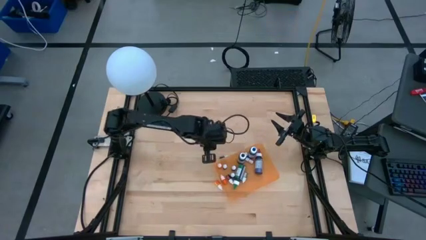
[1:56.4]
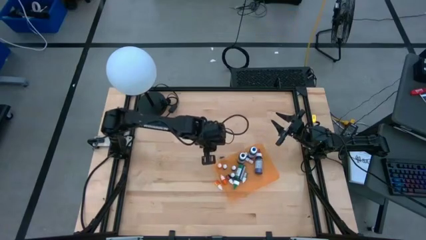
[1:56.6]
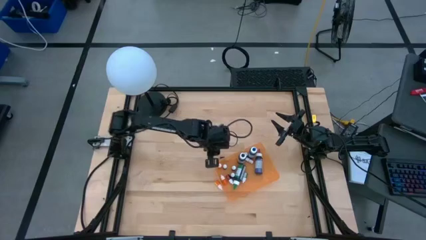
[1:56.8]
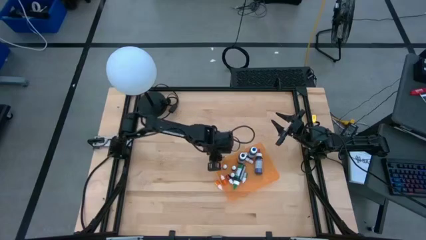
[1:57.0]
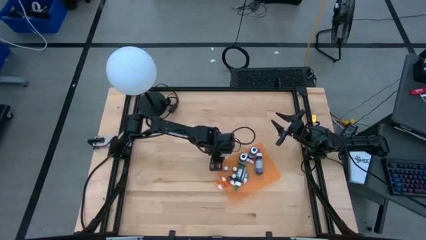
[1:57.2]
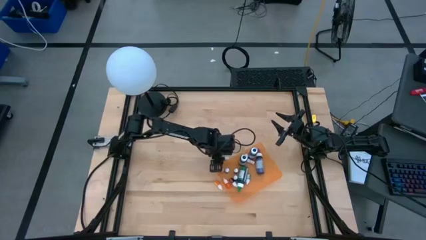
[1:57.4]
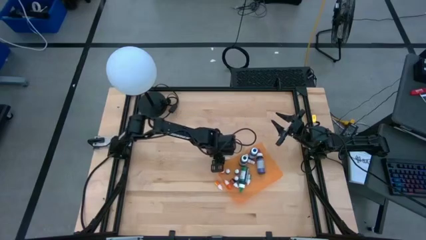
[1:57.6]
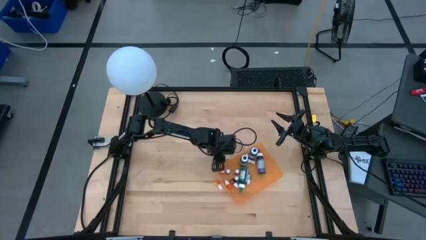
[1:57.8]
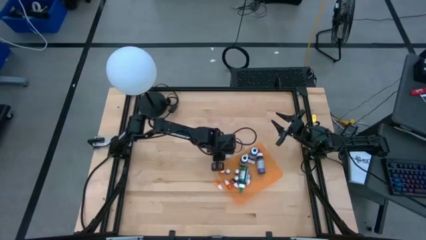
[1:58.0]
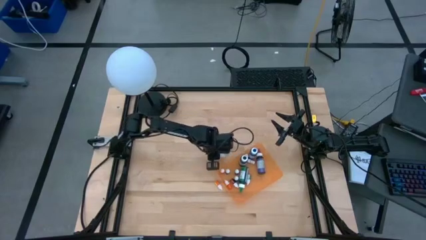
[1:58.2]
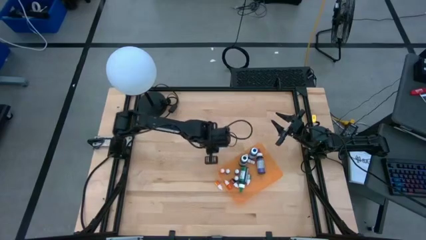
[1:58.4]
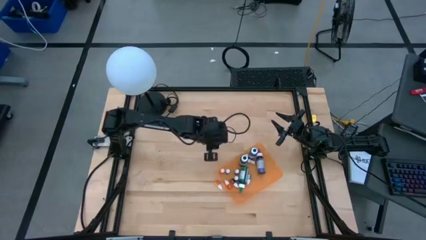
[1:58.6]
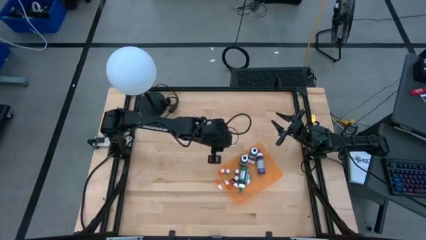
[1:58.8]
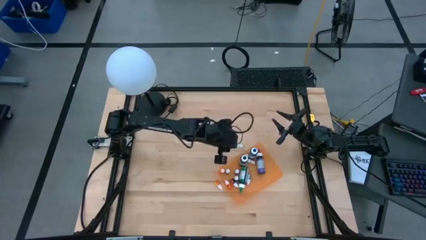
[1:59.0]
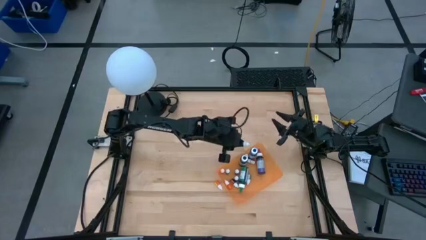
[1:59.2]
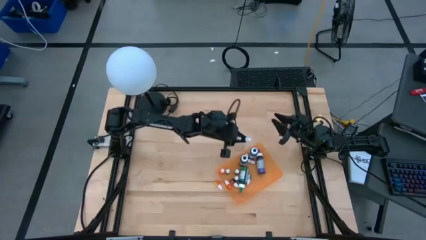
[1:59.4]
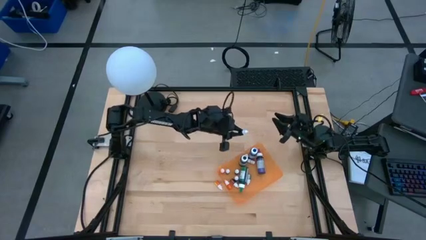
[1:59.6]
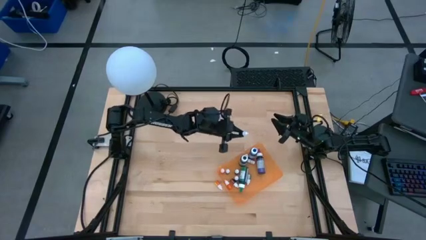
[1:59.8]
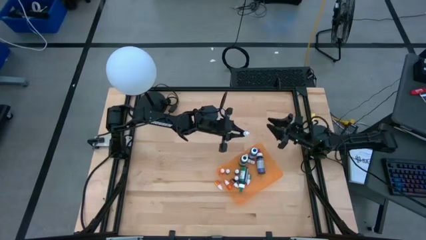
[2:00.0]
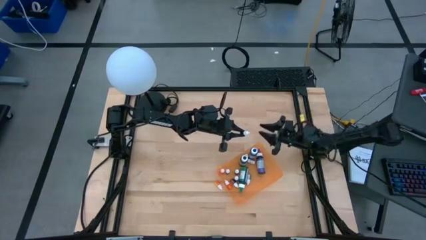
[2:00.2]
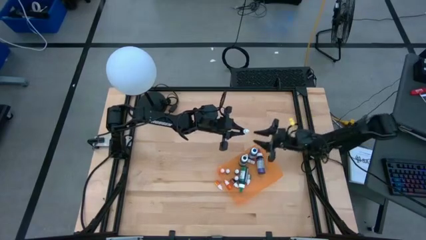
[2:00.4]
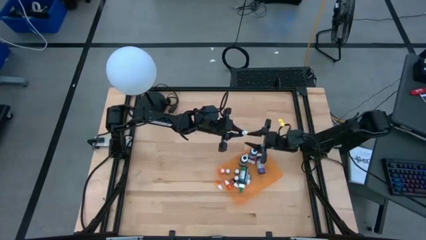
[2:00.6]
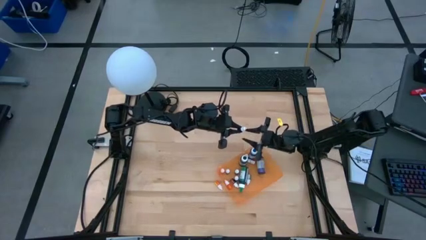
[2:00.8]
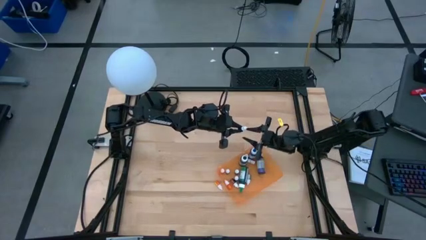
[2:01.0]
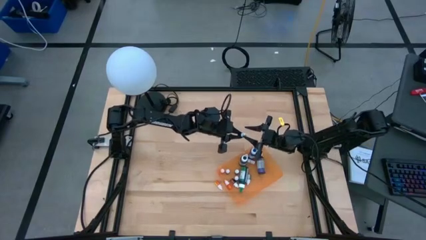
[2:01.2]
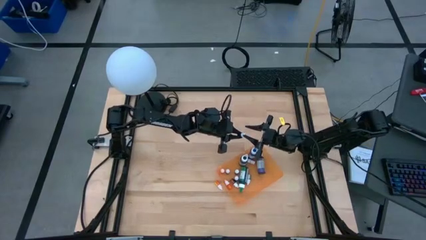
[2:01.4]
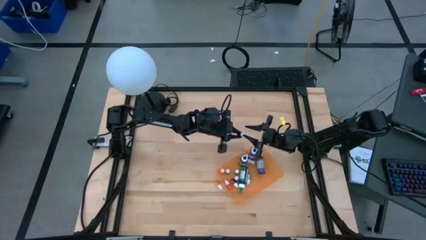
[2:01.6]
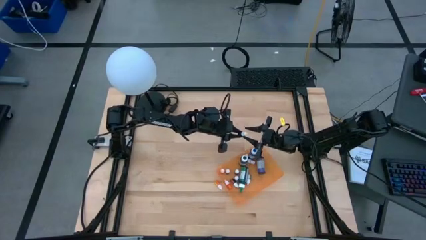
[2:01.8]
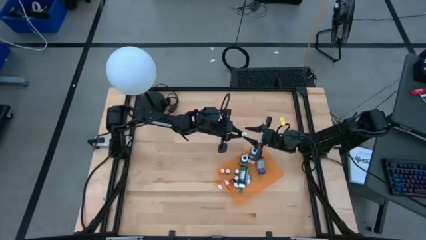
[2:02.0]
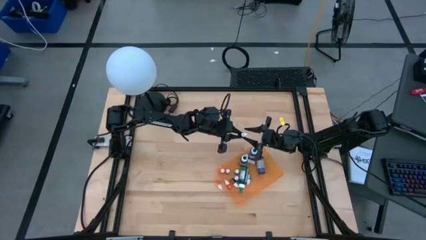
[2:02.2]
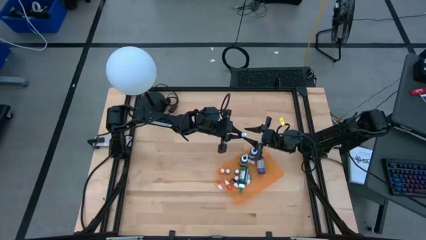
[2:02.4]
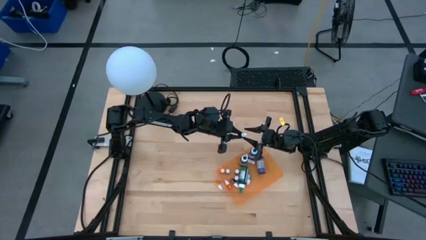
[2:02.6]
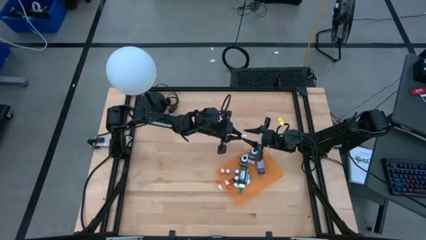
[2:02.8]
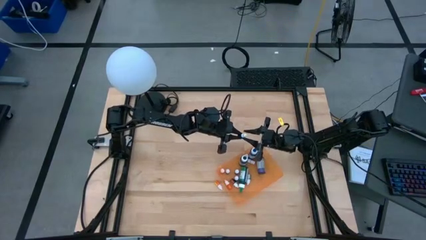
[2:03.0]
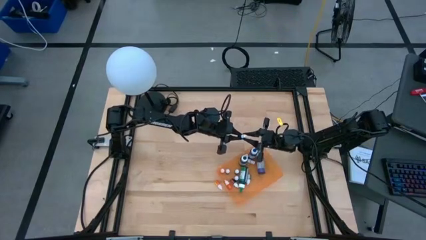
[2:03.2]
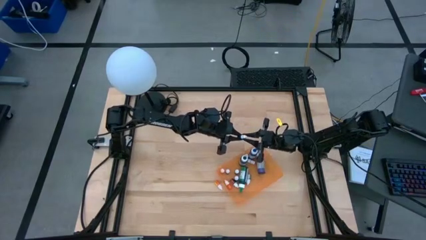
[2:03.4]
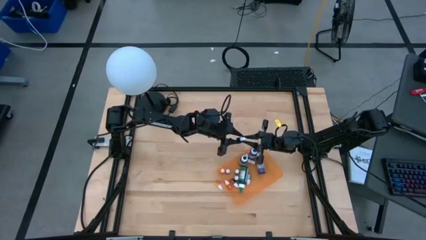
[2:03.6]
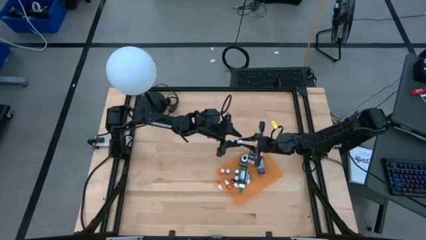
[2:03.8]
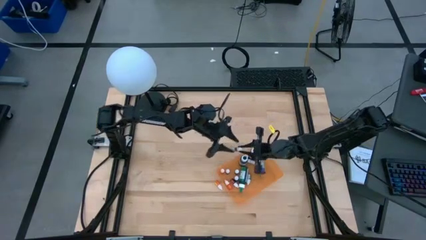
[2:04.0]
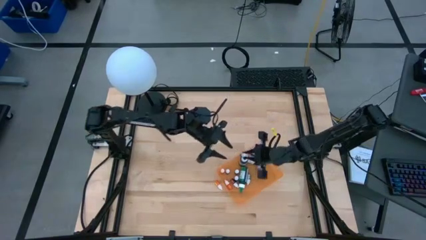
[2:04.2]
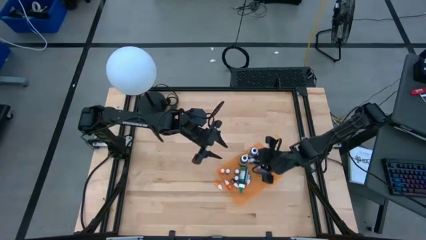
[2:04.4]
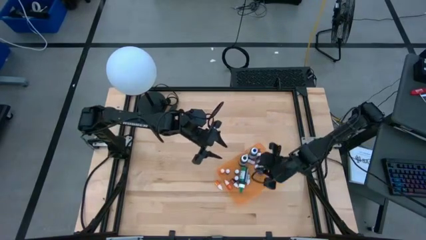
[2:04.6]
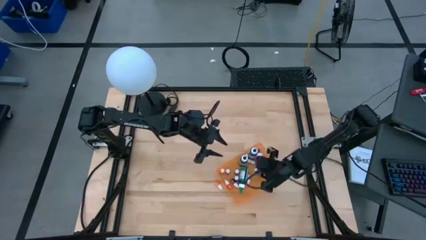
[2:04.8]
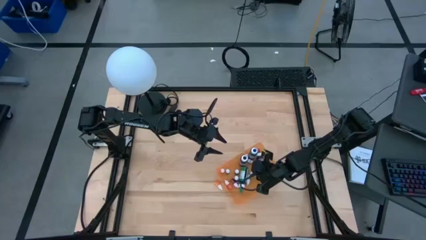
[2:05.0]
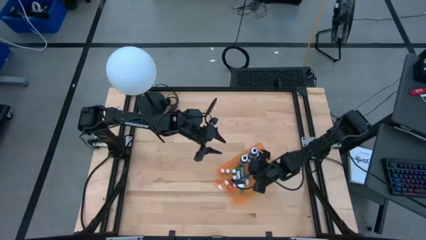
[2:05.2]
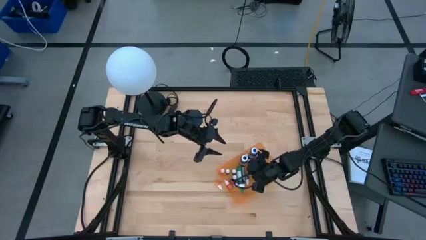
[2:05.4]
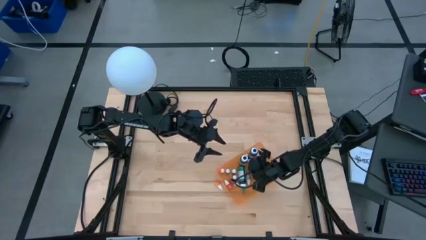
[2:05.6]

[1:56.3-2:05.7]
Task: Pick & Place food coloring
Put the small blue food coloring bottle into the orange bin

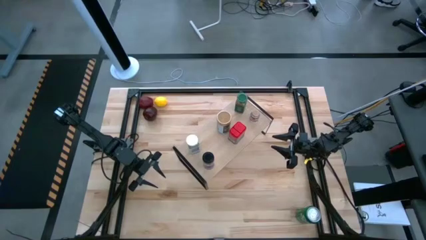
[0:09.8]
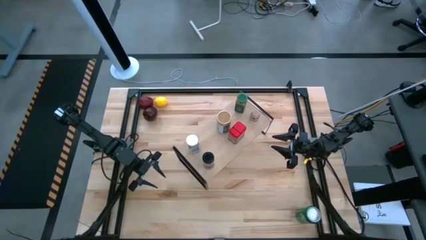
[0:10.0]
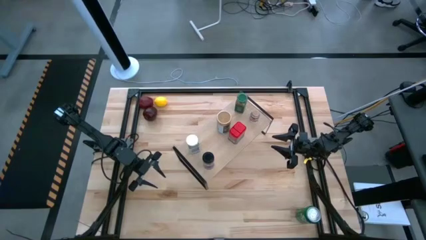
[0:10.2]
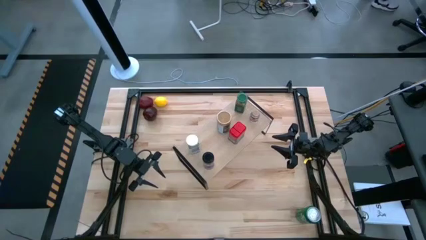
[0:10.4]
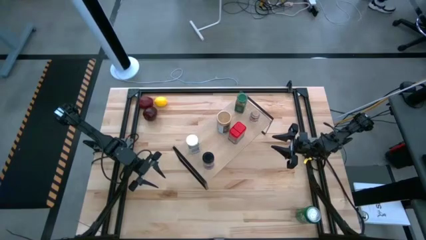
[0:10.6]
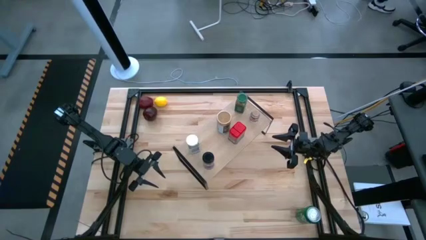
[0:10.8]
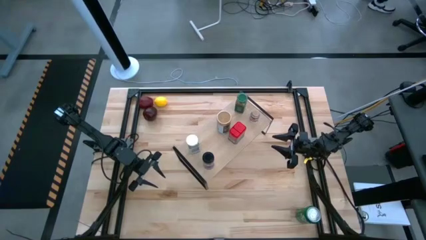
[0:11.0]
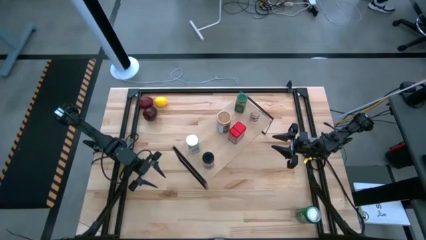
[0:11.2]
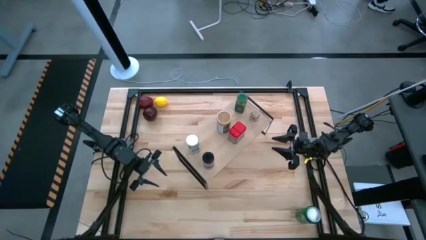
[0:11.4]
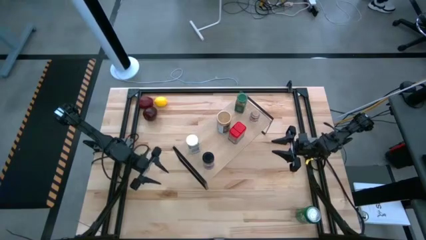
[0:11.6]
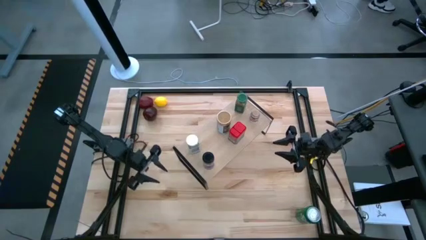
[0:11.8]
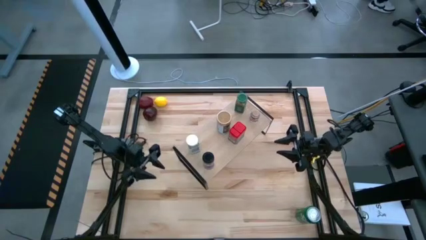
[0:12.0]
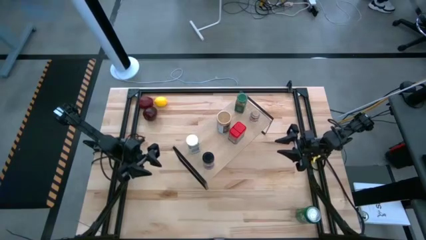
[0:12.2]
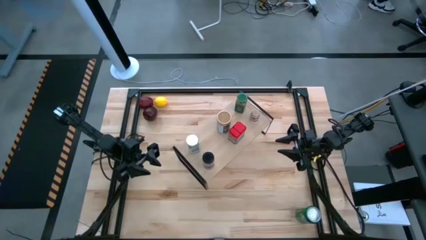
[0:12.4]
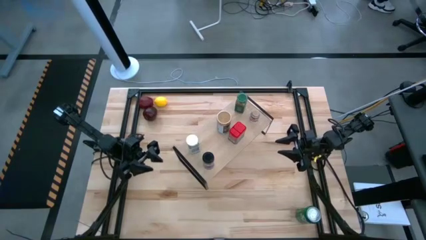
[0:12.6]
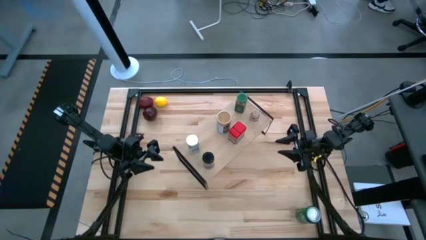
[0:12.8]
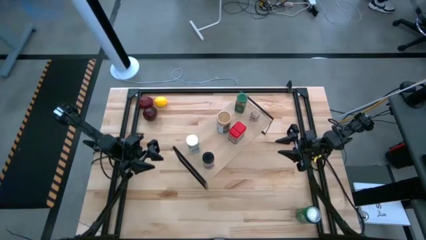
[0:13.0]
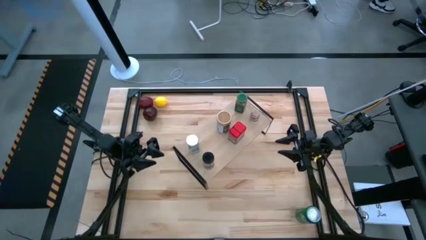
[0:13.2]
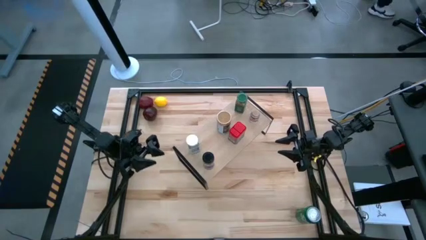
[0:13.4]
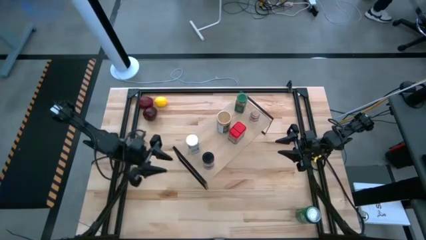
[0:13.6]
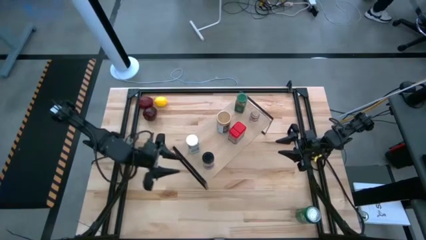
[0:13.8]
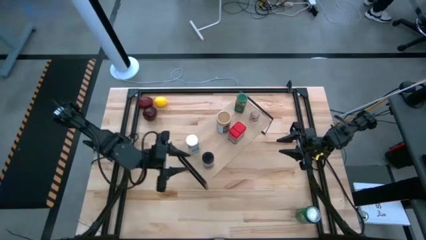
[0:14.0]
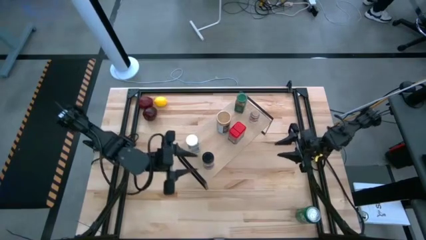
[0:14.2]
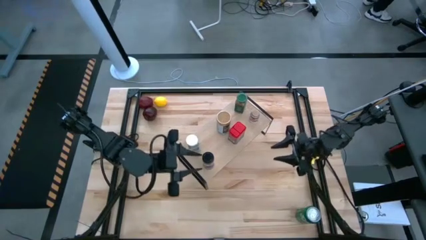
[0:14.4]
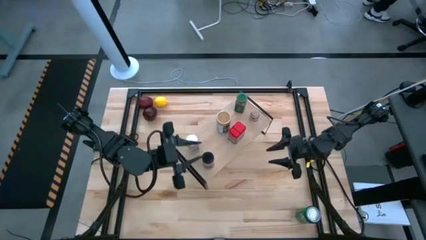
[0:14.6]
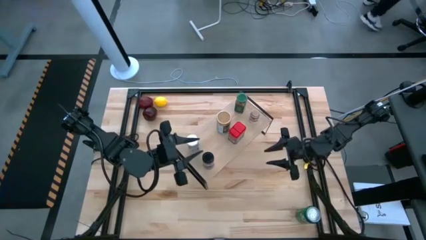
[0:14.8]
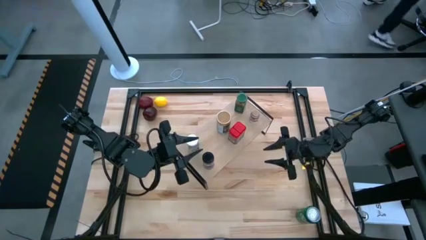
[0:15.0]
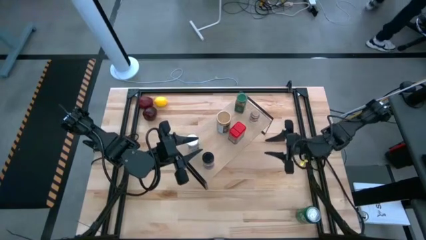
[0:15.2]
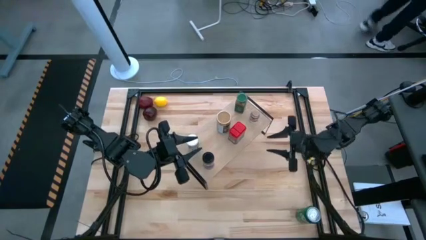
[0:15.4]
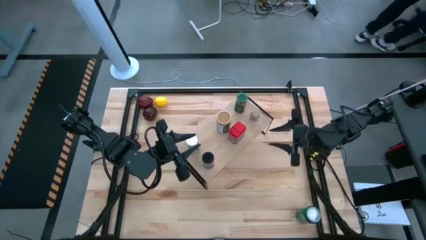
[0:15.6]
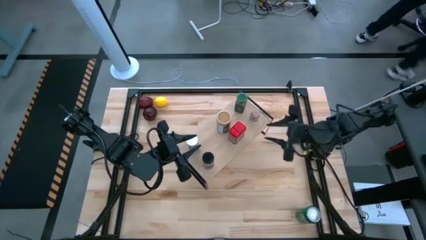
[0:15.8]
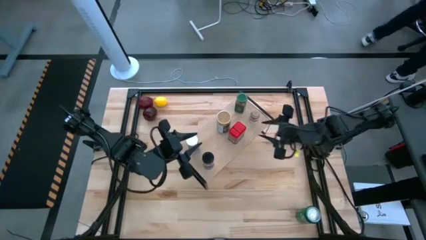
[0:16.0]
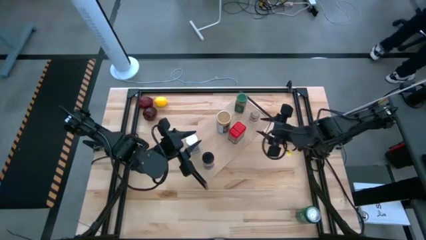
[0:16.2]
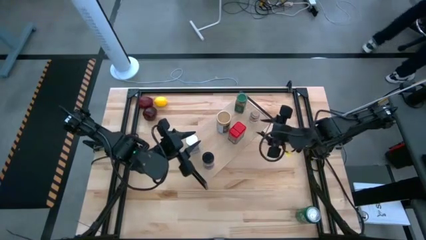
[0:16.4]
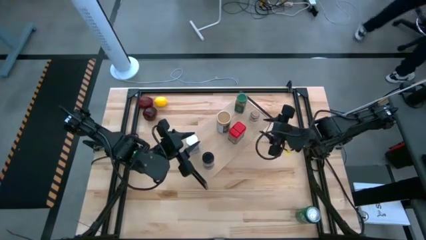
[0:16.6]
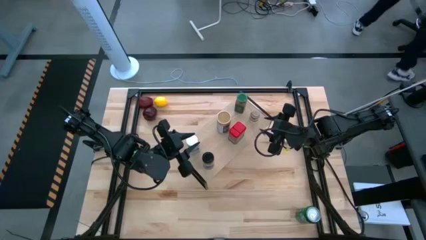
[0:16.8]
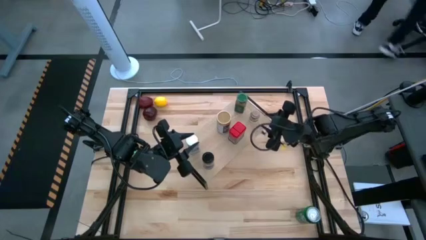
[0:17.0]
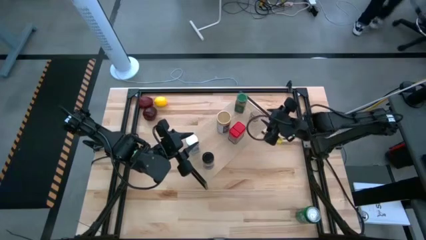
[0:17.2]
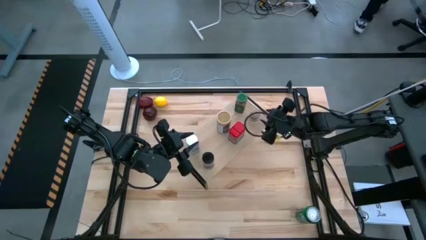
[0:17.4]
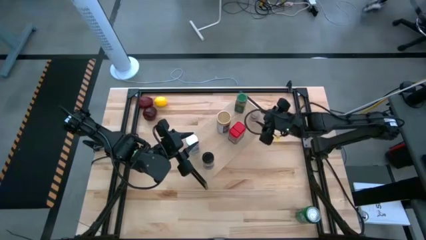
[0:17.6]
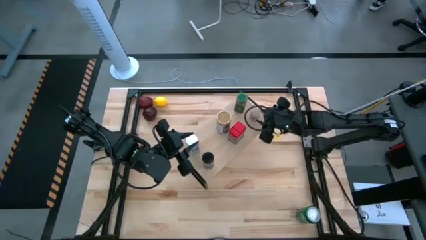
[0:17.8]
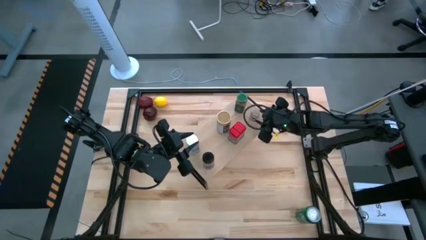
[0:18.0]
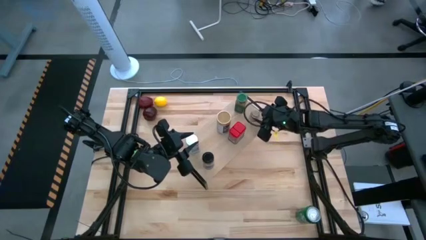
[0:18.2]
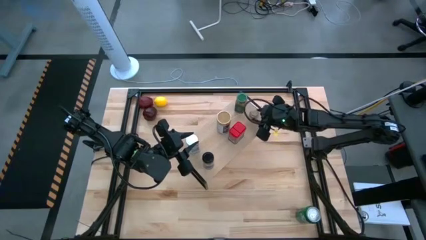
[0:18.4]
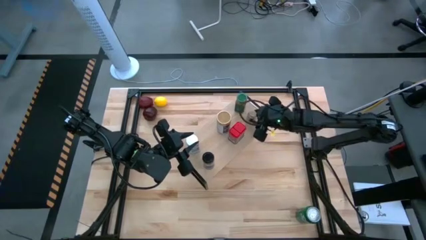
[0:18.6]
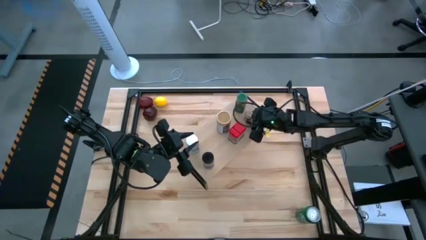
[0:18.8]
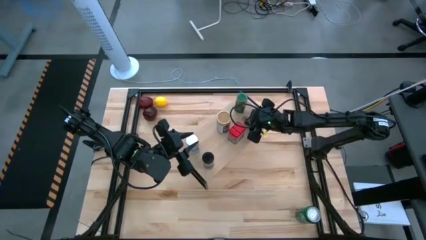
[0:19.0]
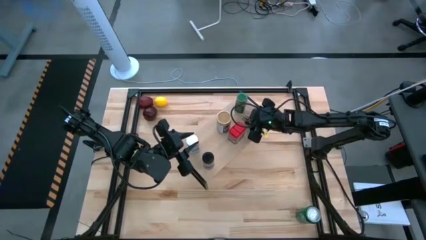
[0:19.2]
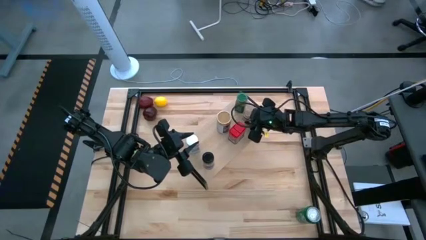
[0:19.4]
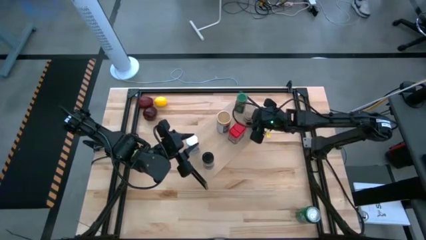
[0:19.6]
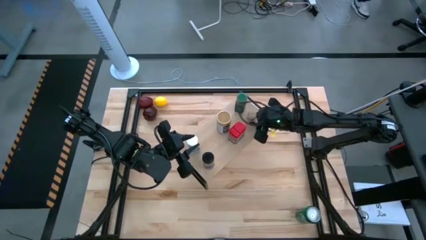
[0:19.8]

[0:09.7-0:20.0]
Task: Shelf spices
Remove the brown seasoning bottle from the shelf
